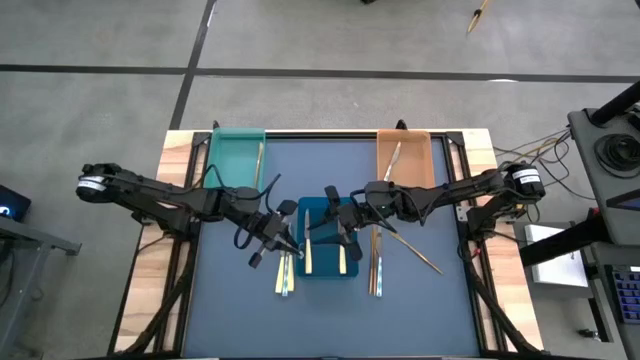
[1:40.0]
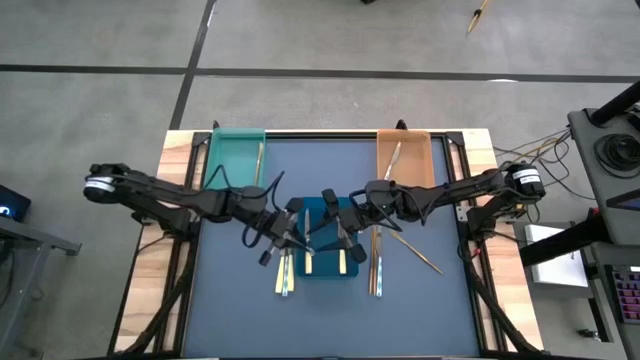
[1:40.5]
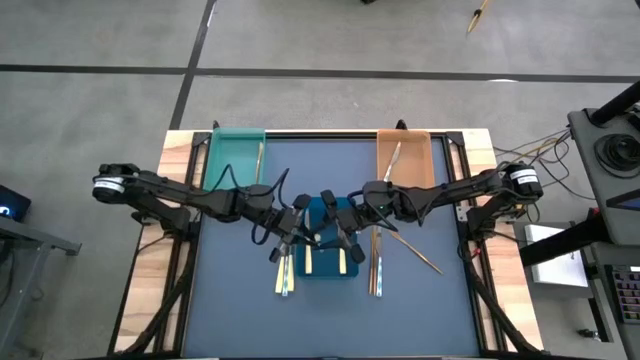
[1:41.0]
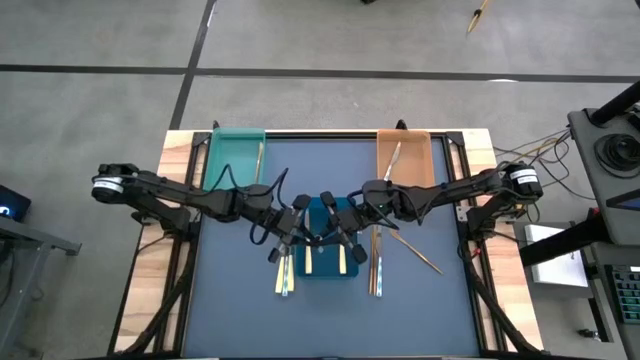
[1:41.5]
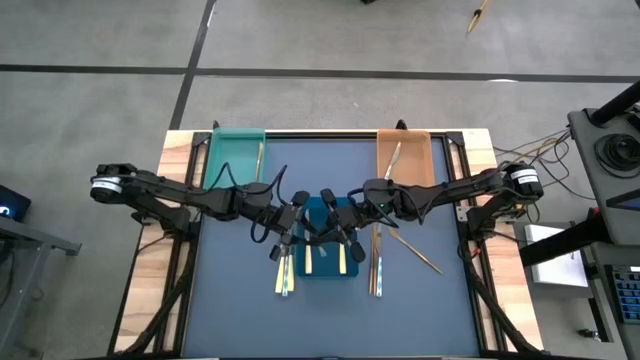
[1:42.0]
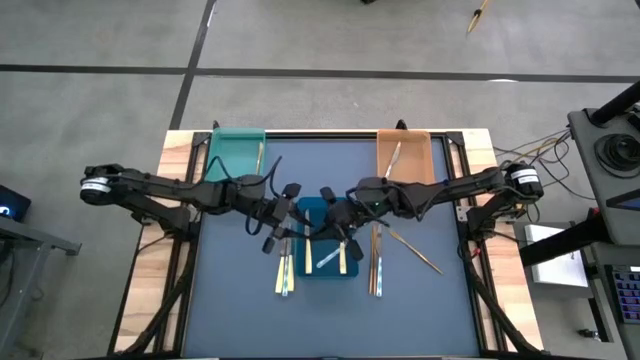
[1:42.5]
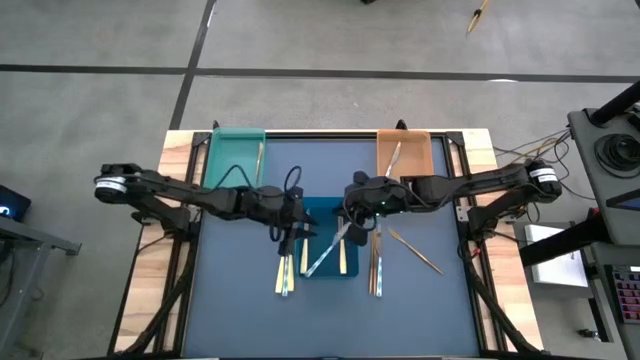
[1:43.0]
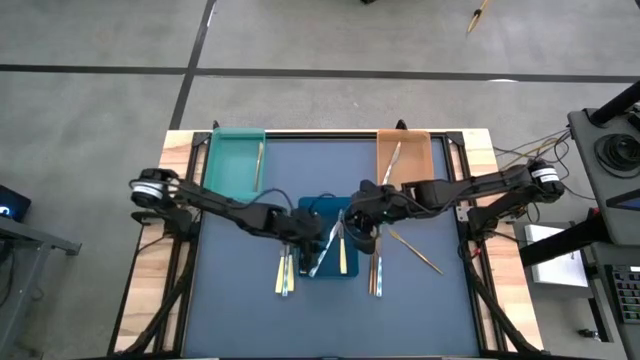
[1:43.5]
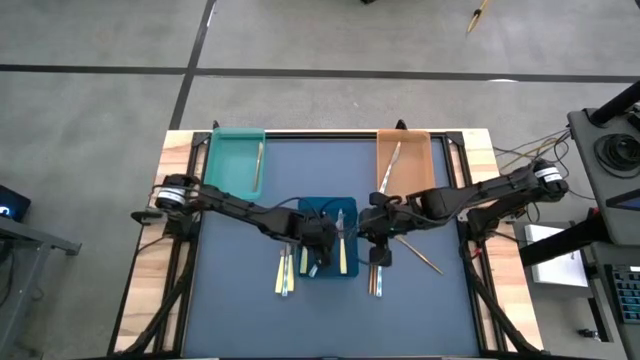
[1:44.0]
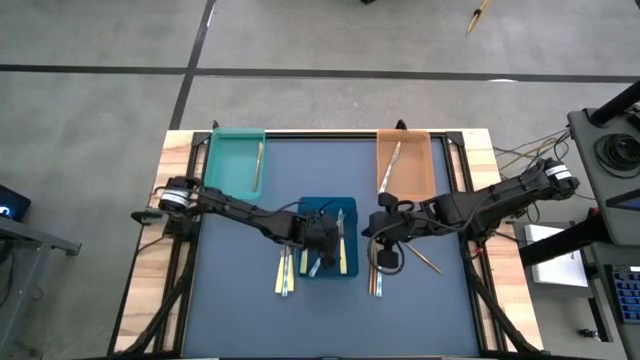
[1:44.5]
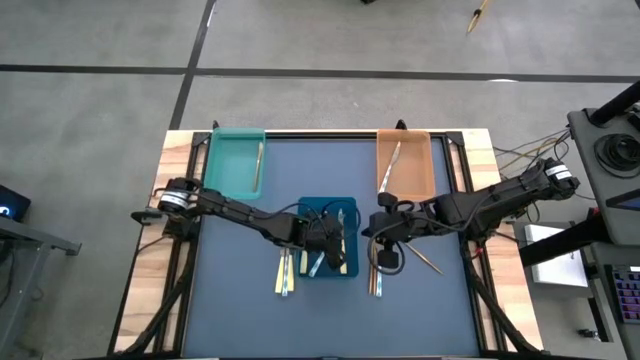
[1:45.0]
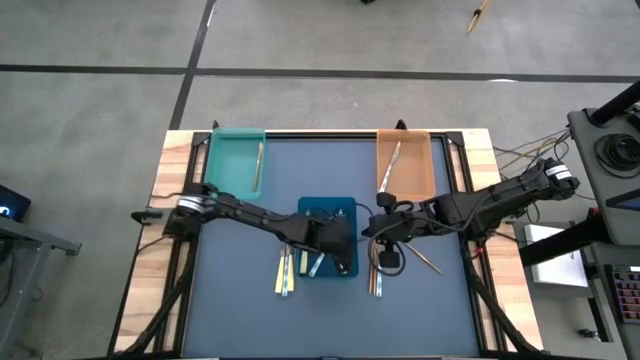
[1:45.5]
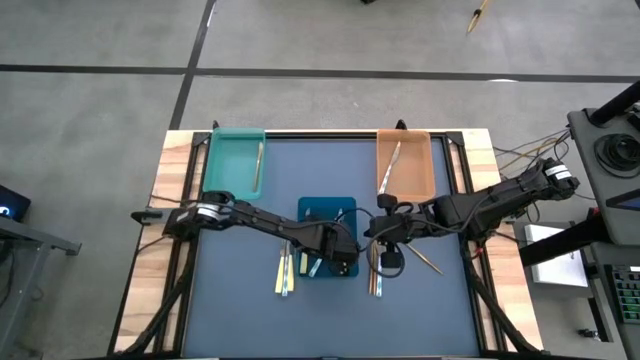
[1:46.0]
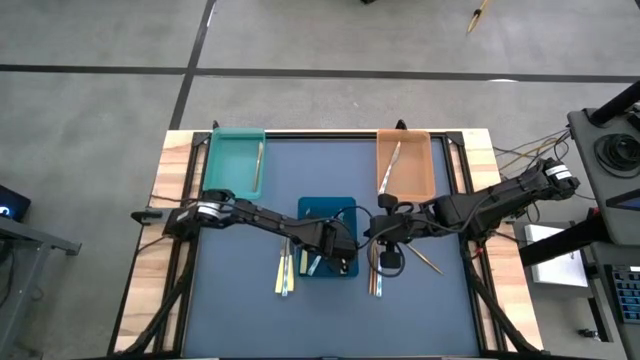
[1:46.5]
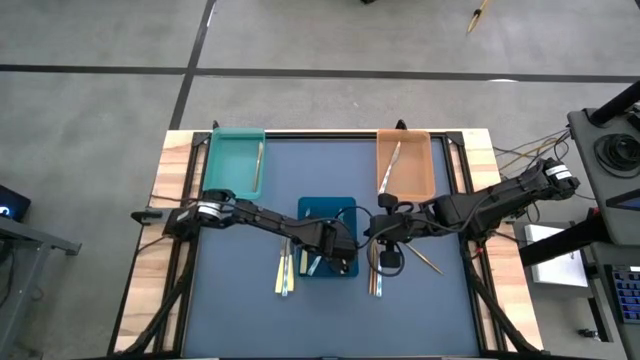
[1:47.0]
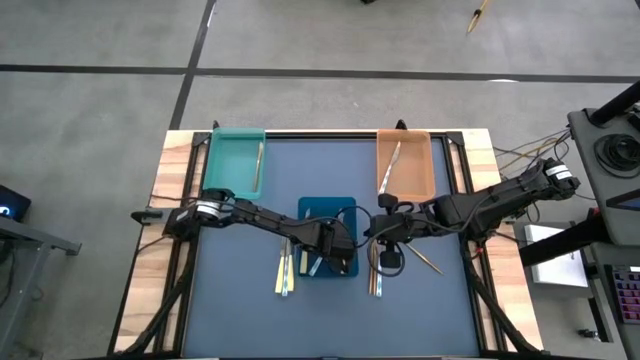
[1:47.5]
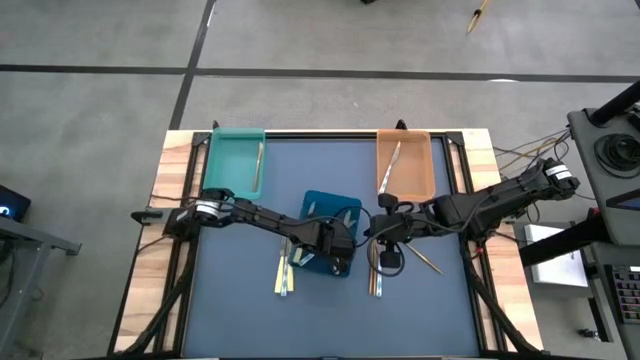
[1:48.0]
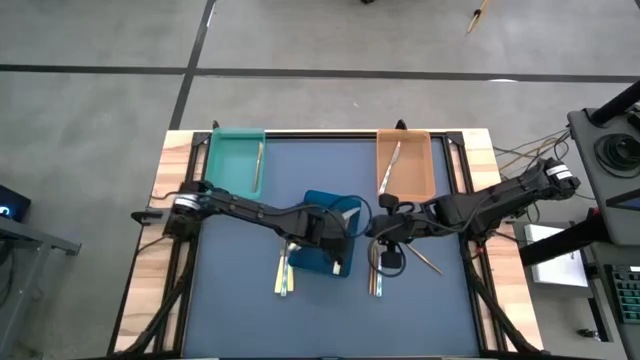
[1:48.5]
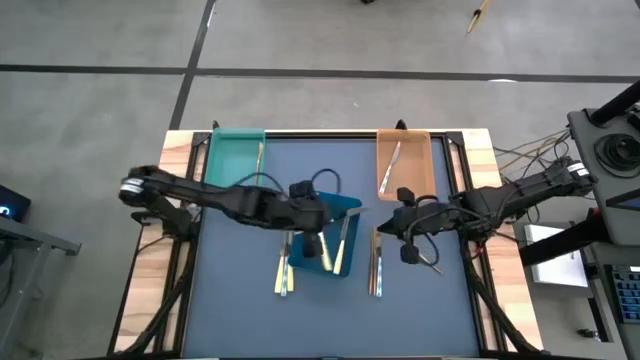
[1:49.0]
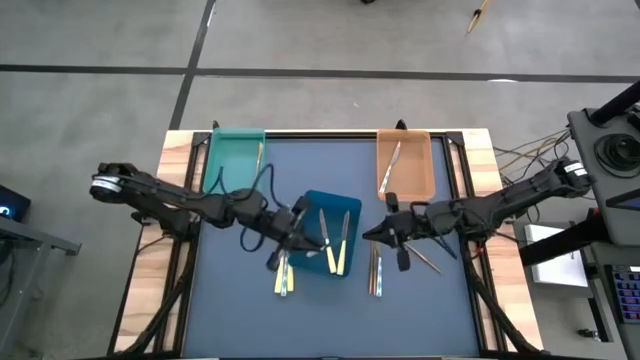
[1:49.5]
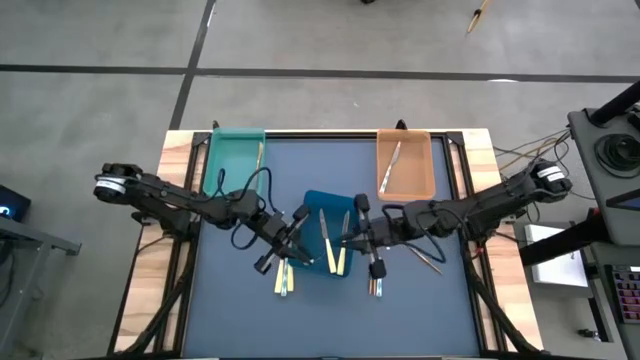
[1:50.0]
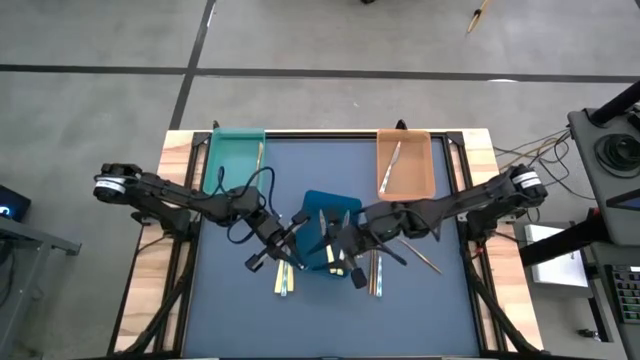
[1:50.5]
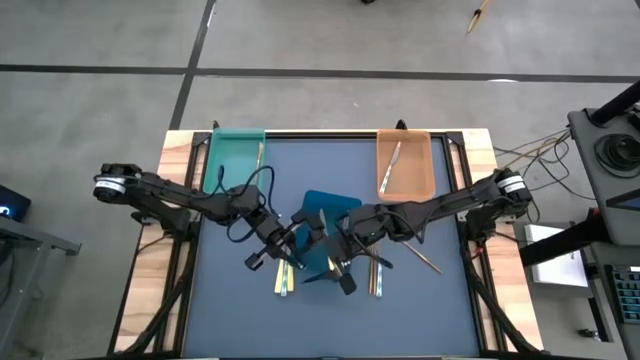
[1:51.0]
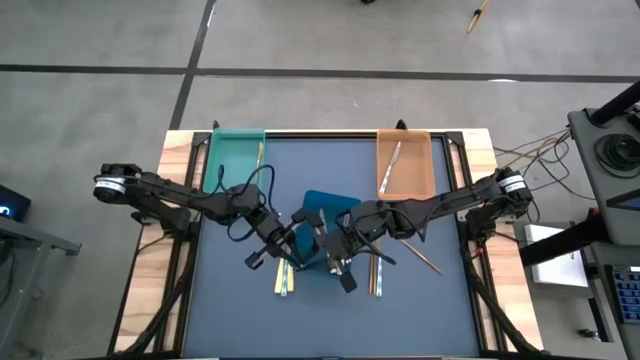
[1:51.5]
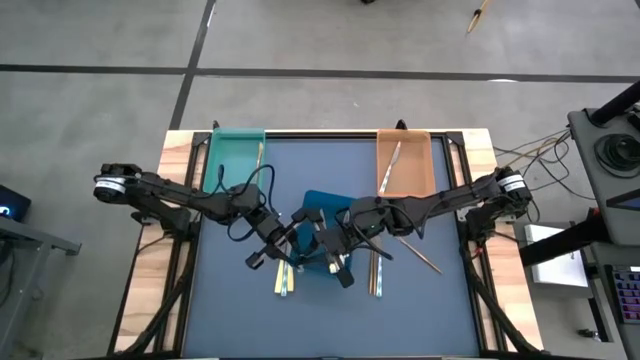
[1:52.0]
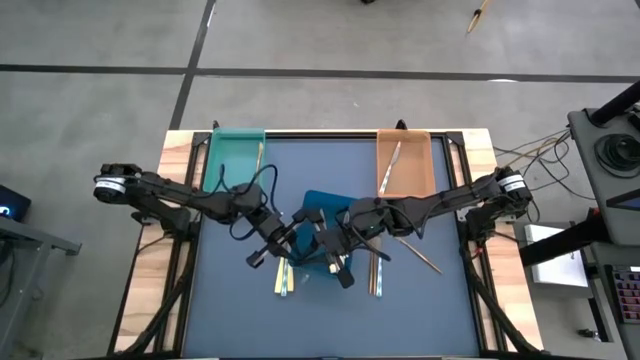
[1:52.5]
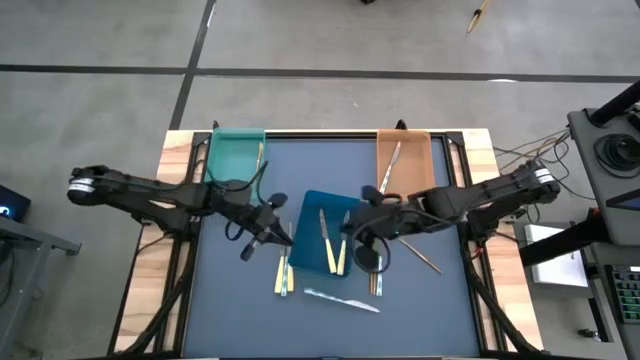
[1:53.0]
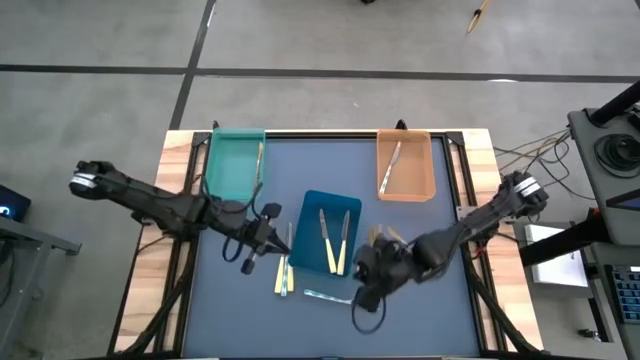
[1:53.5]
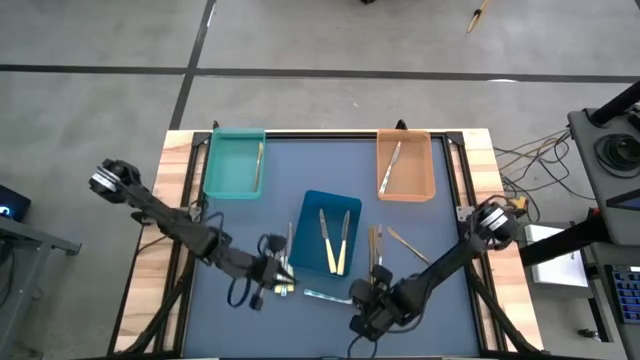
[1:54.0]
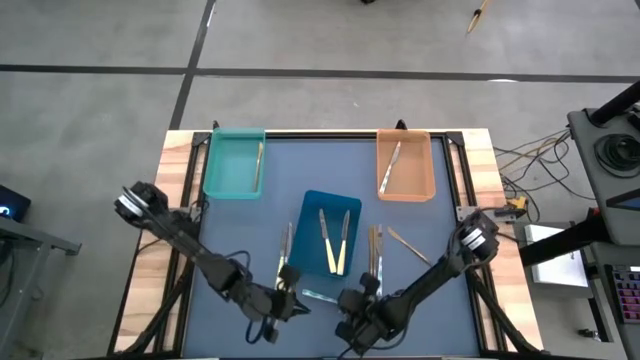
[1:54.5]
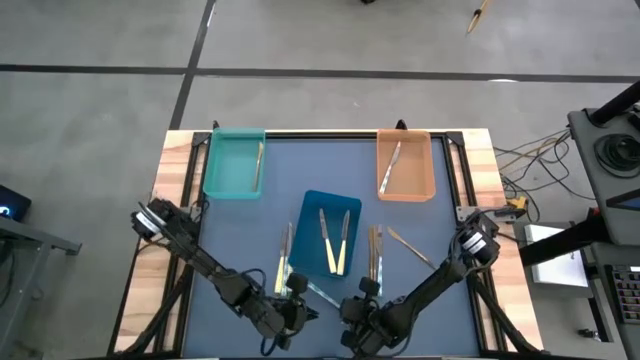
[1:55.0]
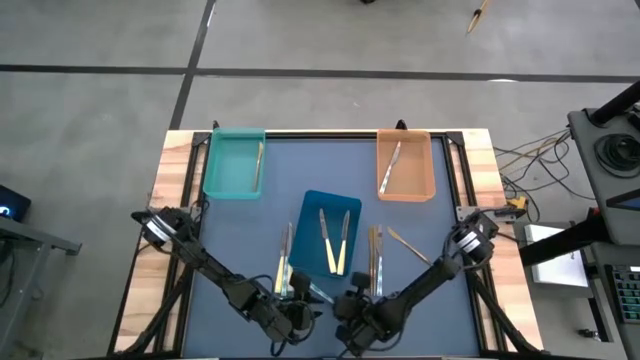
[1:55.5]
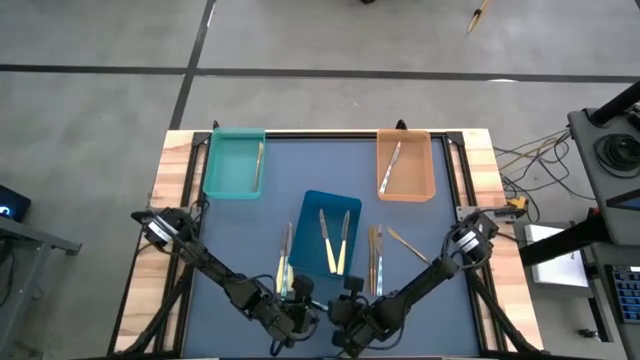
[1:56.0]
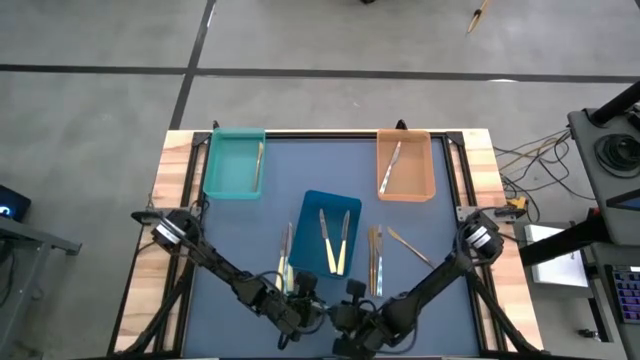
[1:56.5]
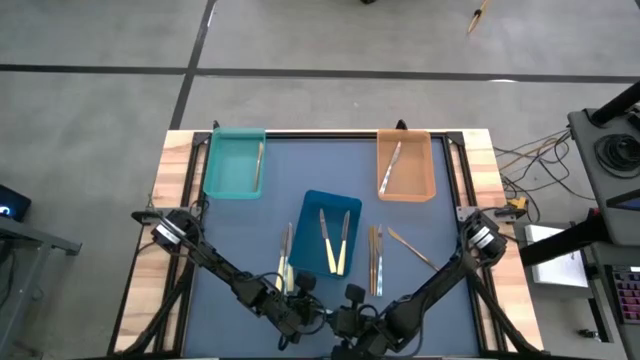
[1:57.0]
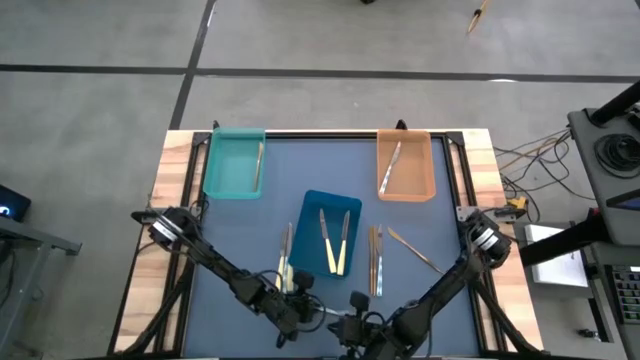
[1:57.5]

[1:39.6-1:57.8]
Task: Sort silverware by color (type)
Put the left blue and white knife into the orange bin

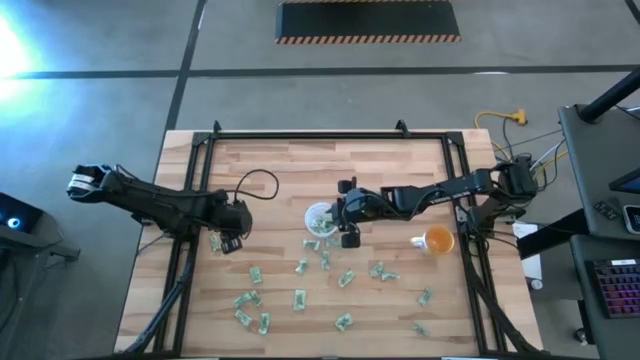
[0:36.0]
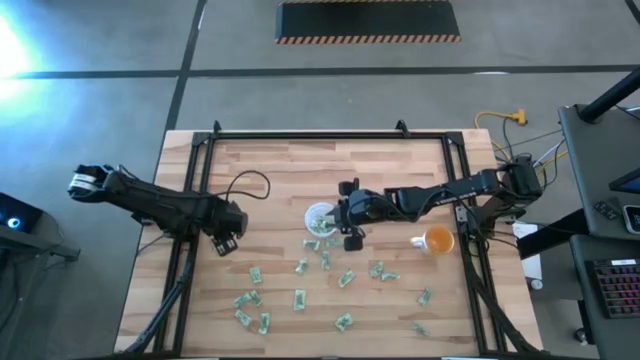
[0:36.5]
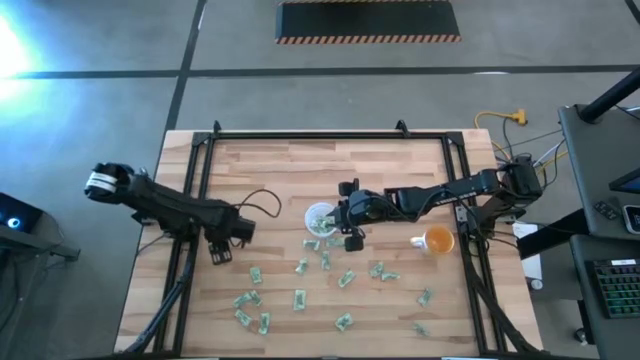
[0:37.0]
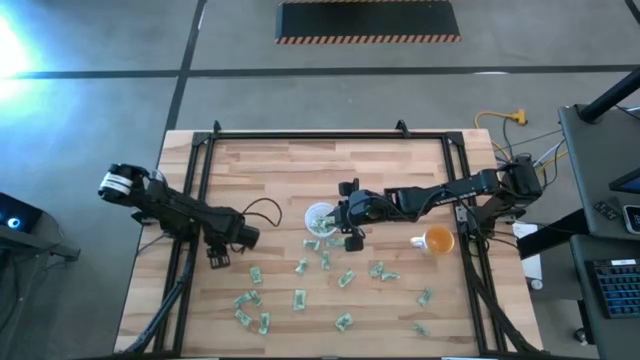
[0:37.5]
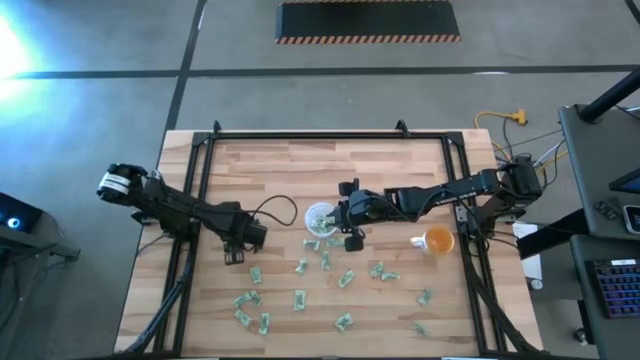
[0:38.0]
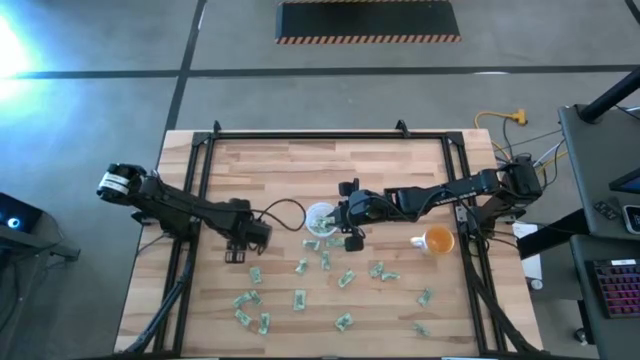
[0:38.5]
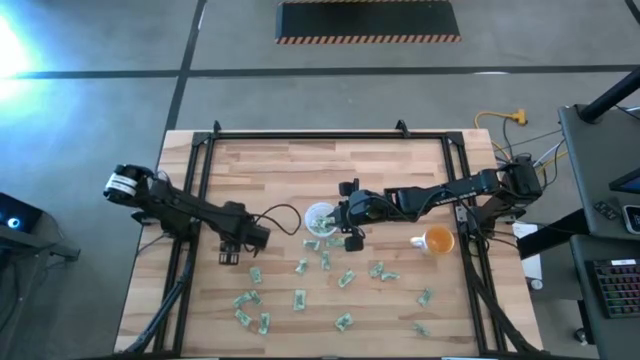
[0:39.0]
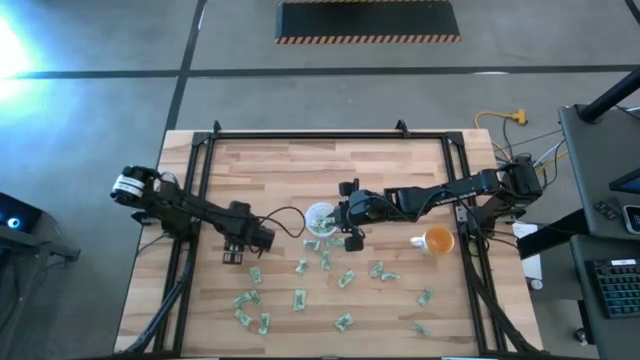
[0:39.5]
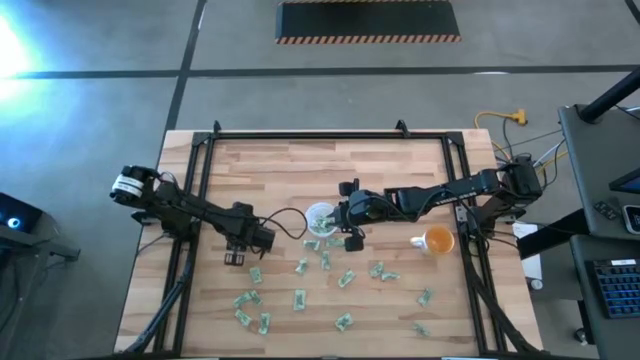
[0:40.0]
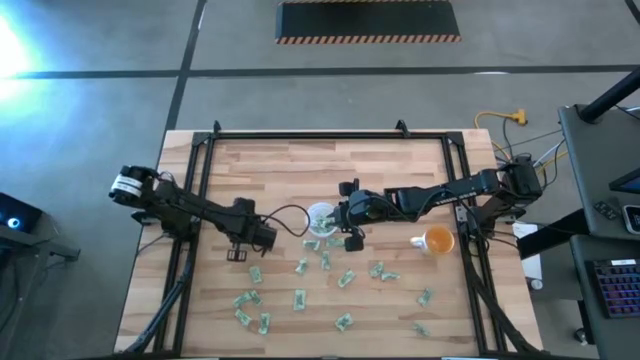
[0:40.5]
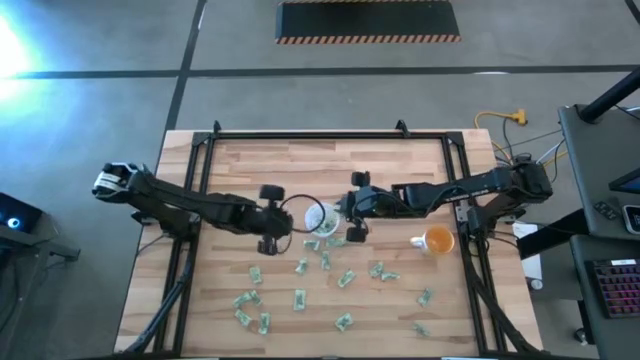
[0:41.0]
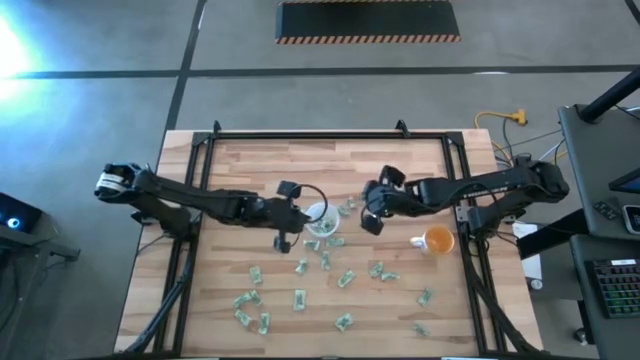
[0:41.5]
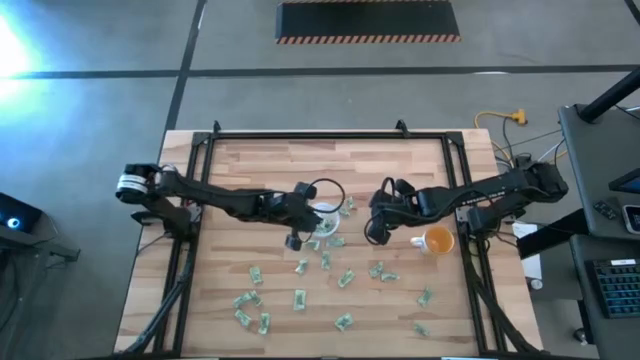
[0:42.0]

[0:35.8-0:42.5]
Task: Pick and place Stevia / Truvia into bins
Put the light green stevia packet into the transparent container
